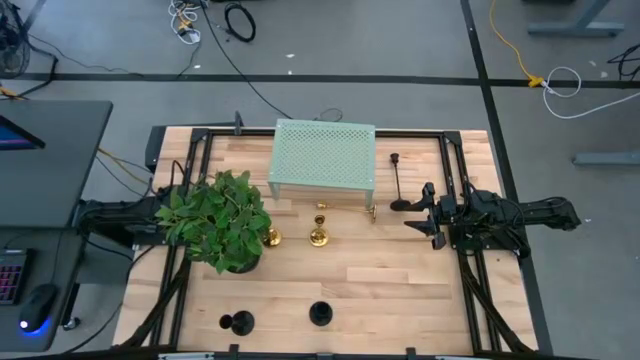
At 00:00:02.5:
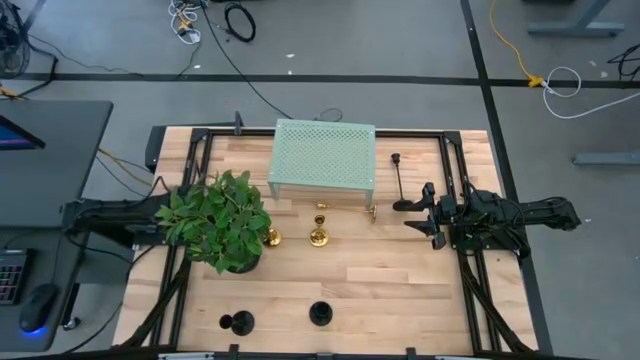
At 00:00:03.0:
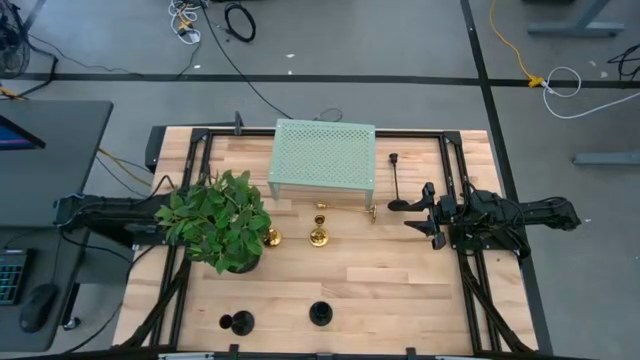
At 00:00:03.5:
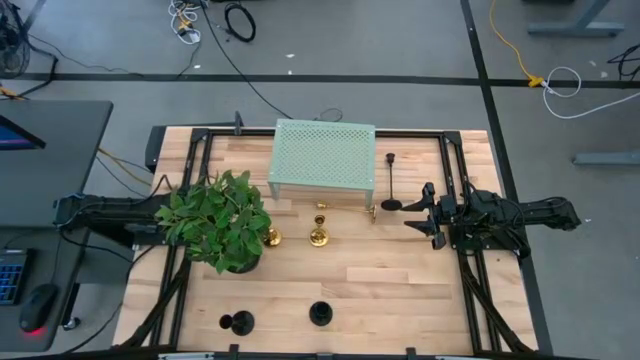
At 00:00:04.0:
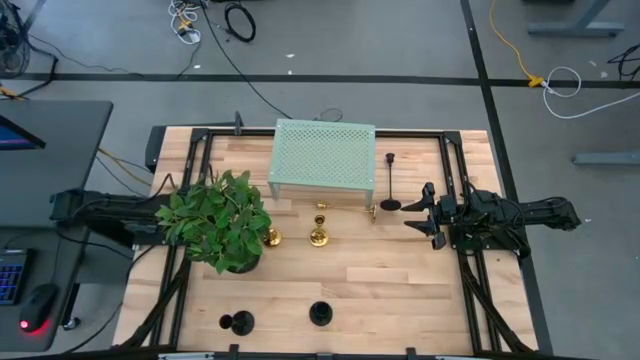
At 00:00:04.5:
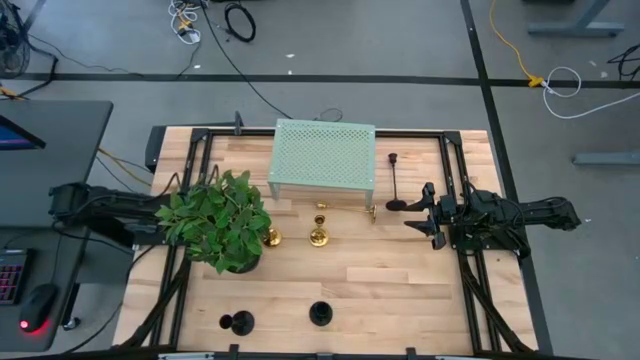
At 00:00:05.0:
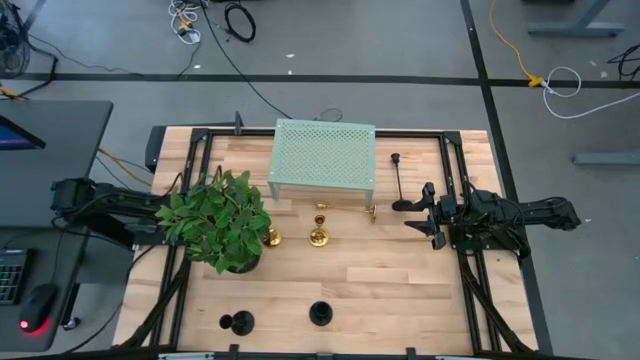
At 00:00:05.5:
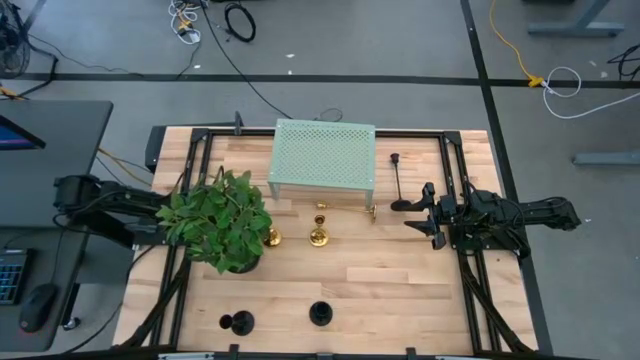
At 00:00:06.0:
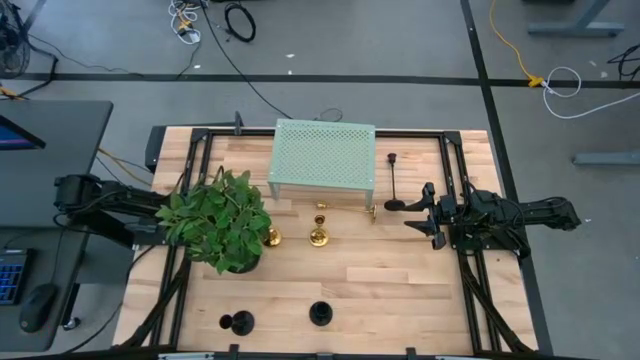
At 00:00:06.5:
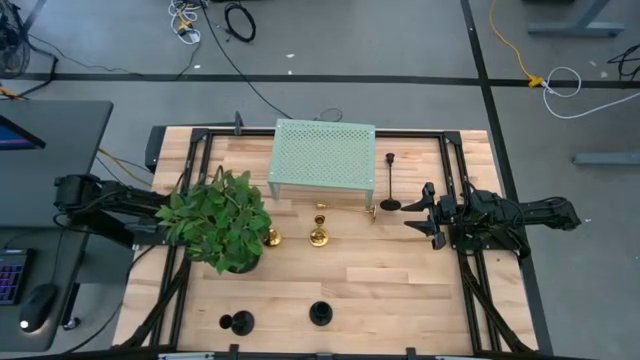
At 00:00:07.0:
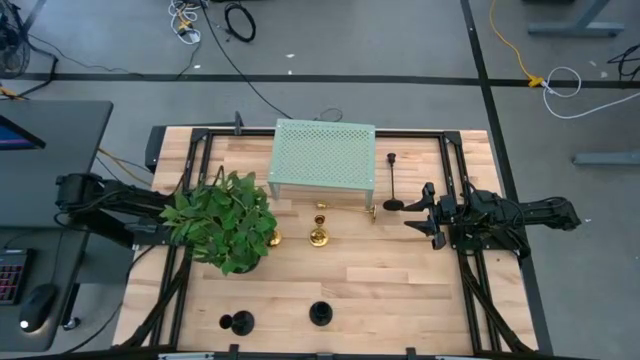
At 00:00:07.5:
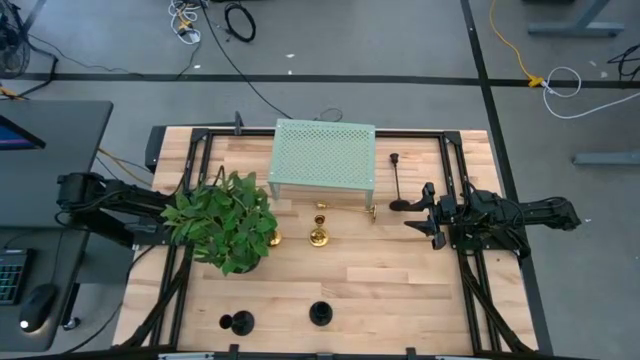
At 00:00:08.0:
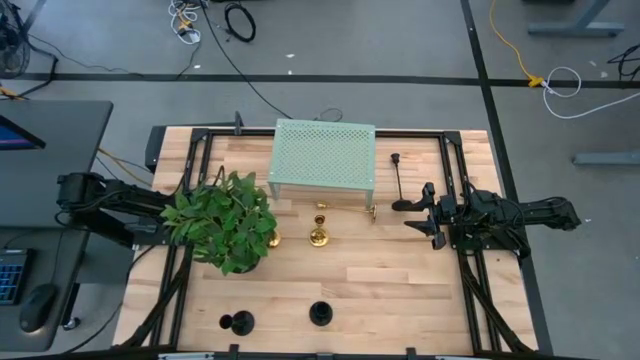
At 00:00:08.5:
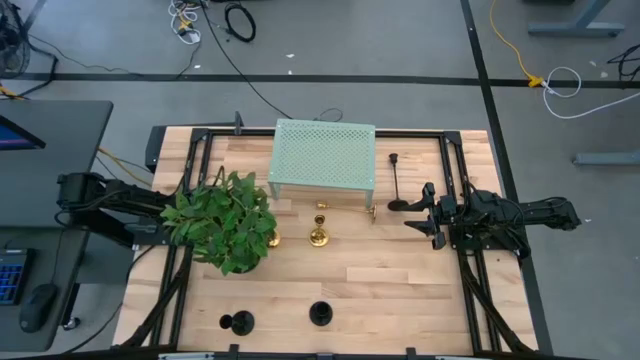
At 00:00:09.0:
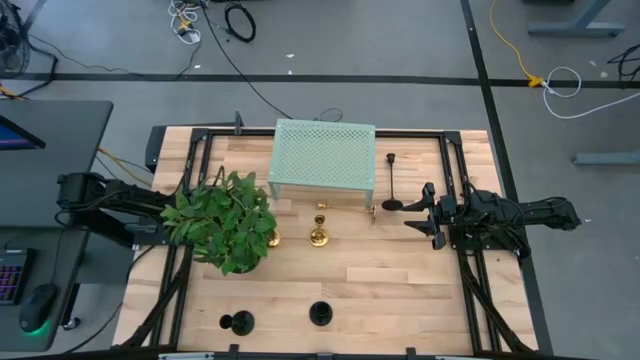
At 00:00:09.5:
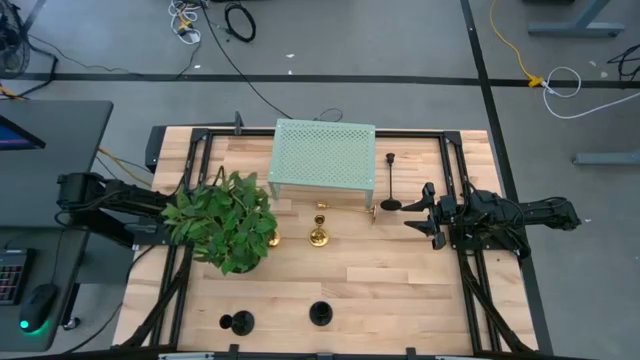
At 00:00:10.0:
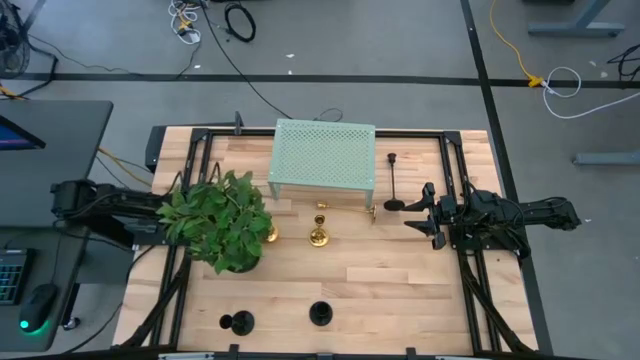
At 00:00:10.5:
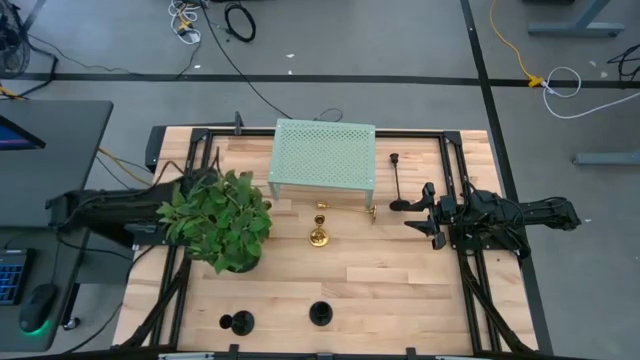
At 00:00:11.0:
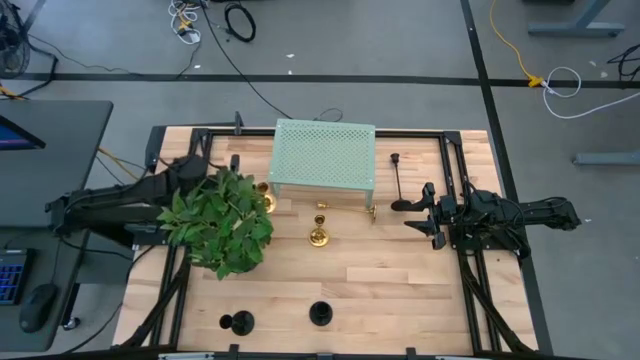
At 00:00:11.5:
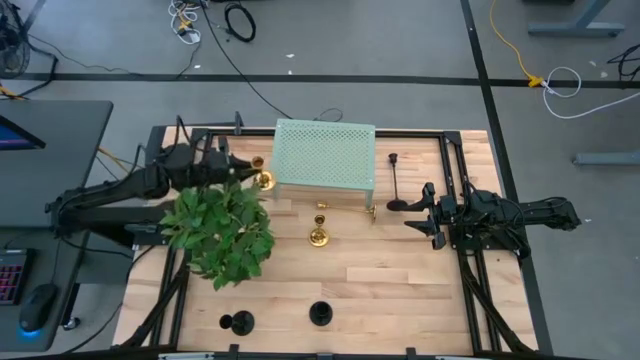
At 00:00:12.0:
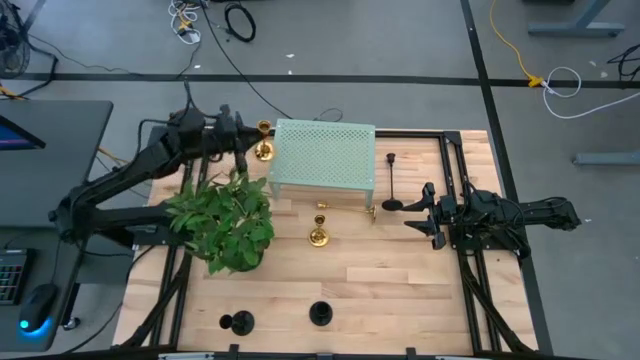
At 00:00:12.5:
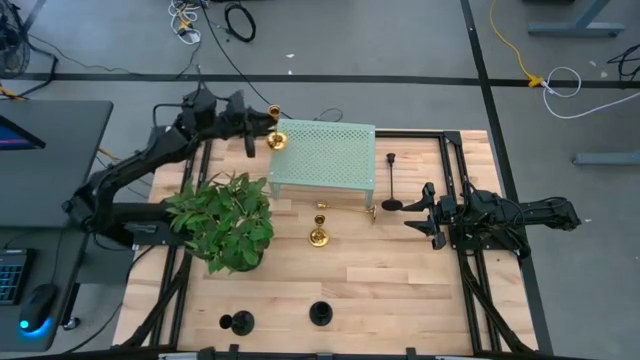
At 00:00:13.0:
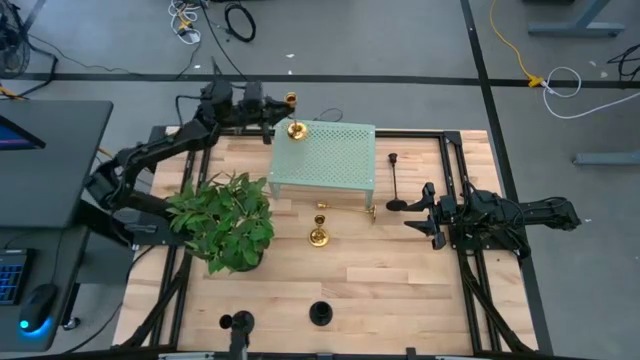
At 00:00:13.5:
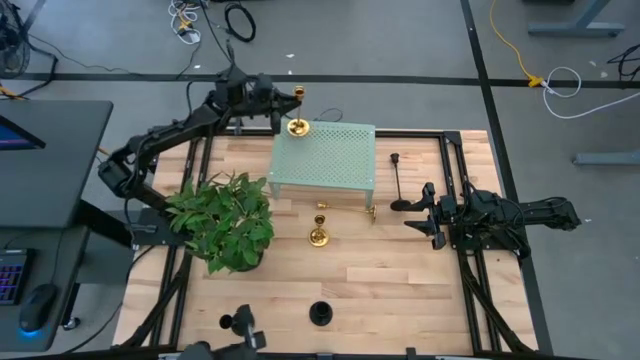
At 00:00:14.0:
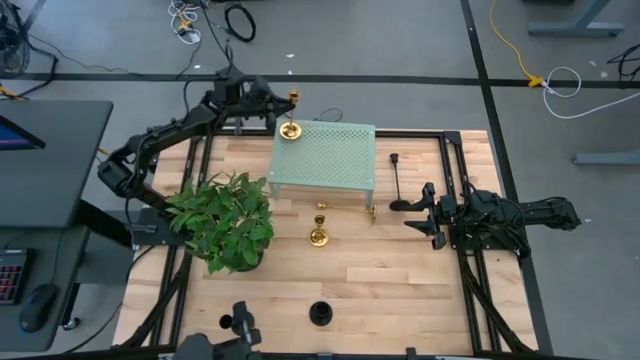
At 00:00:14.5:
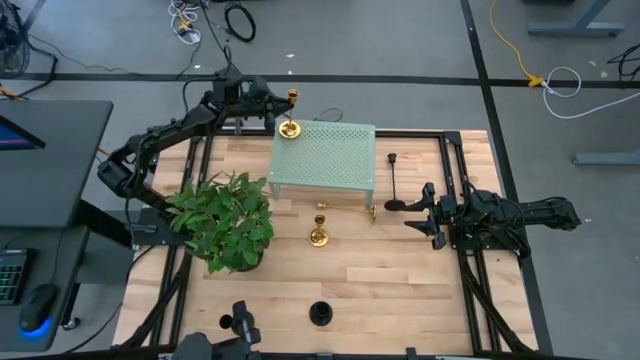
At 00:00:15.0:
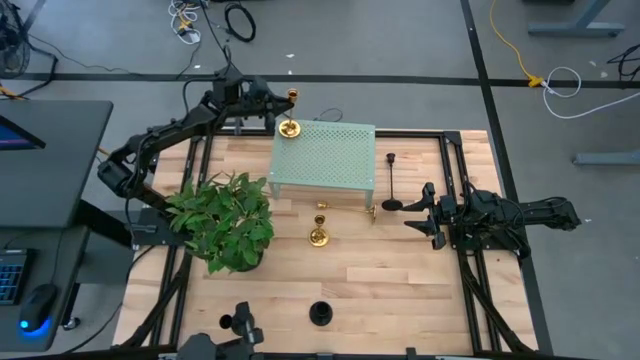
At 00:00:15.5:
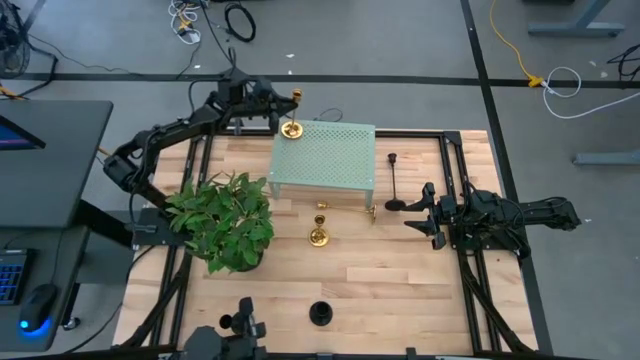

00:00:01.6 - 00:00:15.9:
Task: Pick & Place candle stick holders
Put the left gold candle holder on the shelf

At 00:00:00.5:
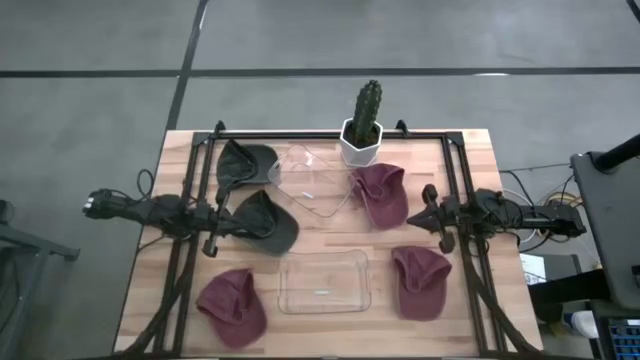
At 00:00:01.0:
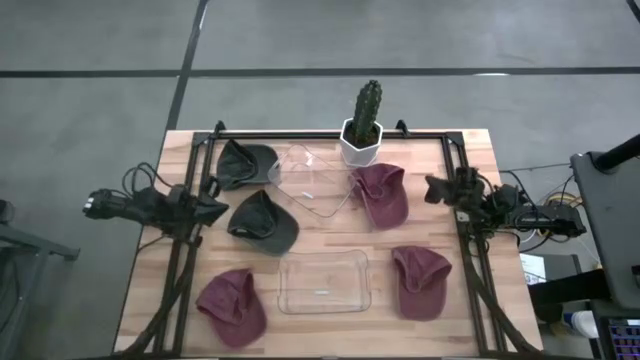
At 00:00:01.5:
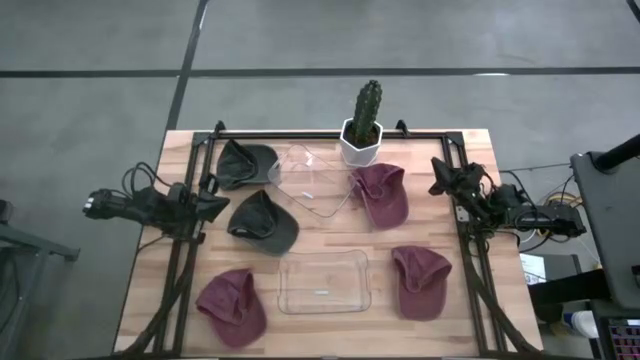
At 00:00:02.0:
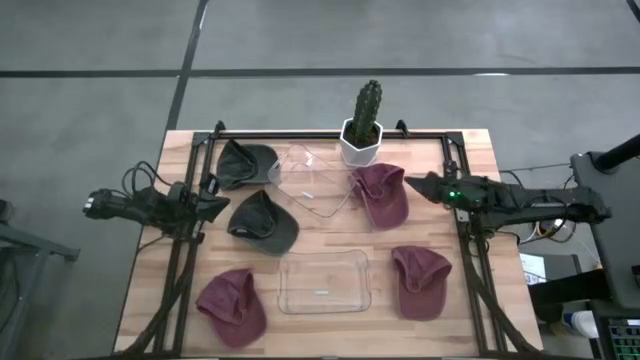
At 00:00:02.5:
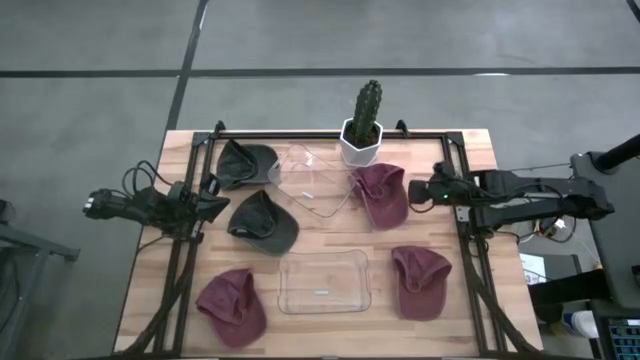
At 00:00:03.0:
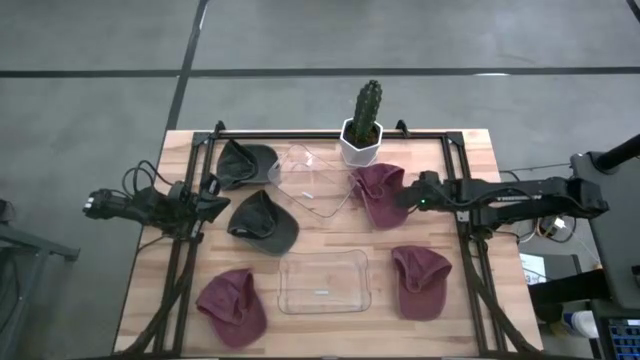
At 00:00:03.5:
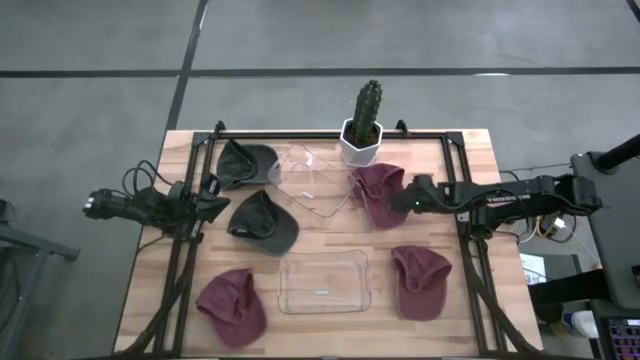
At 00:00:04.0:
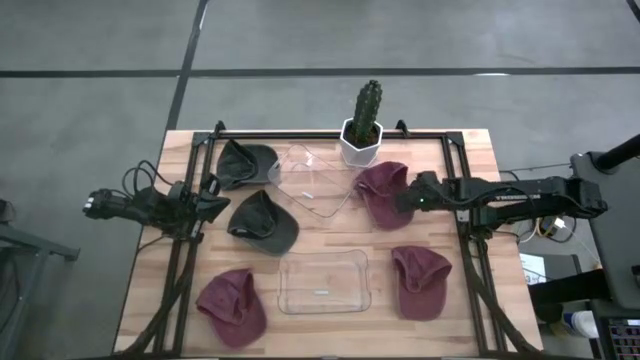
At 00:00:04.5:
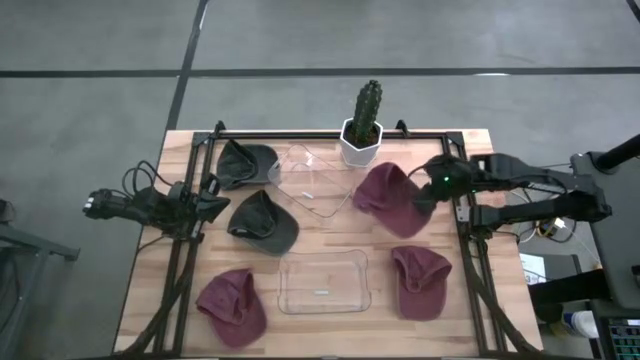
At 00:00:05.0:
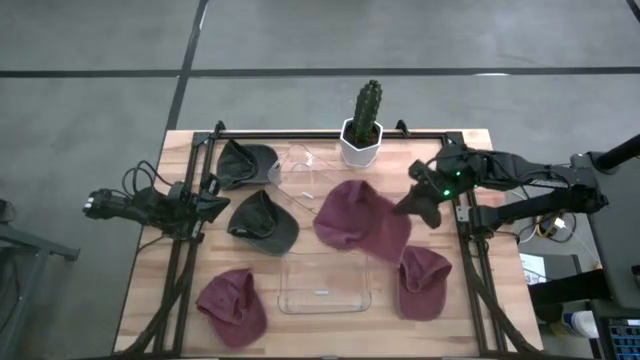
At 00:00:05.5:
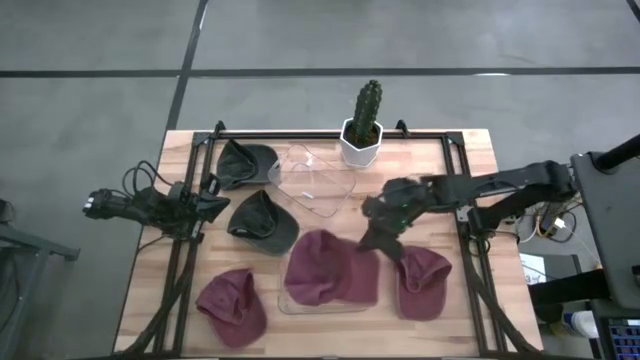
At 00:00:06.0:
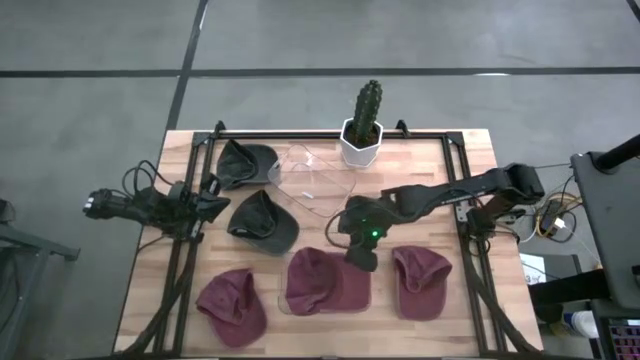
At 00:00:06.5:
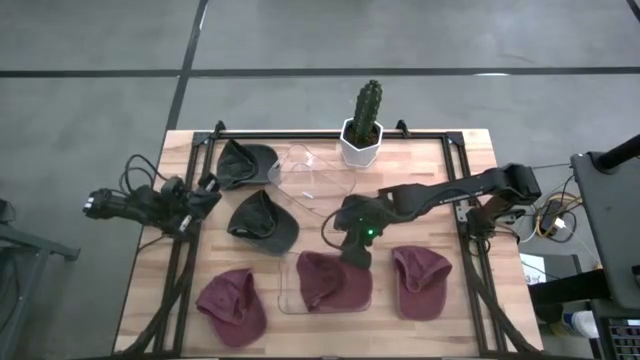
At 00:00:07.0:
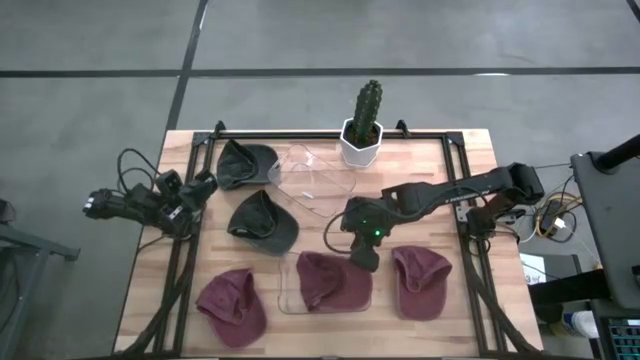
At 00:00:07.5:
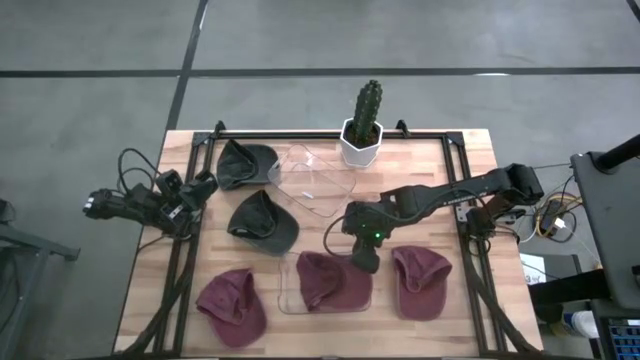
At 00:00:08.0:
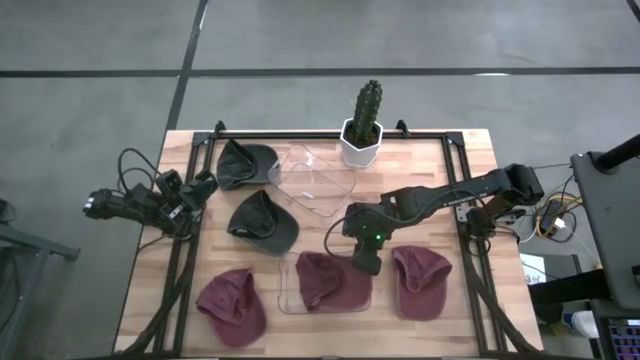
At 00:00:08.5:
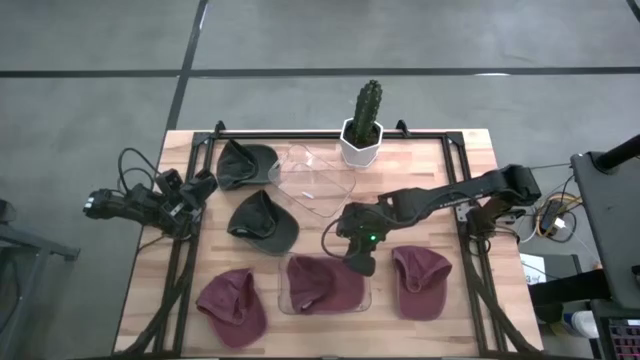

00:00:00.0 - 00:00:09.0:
Task: Pick & Place hat
Put the top right red cap into the bottom transparent bin
